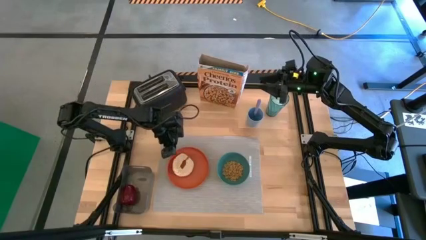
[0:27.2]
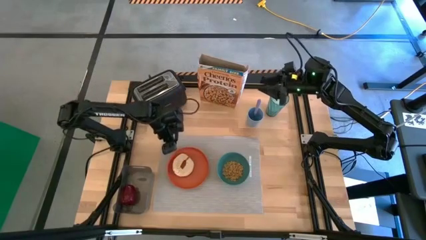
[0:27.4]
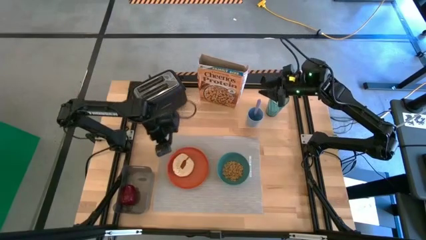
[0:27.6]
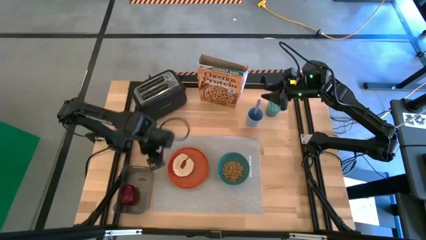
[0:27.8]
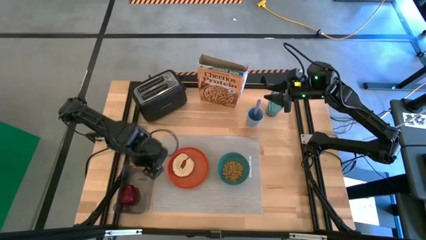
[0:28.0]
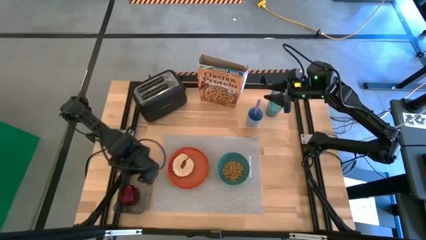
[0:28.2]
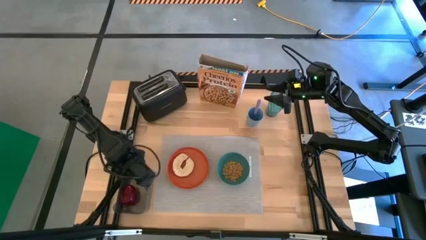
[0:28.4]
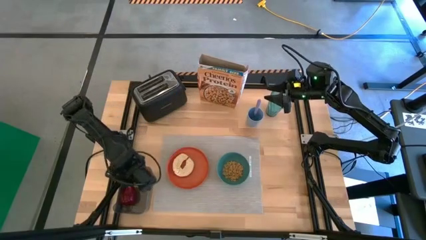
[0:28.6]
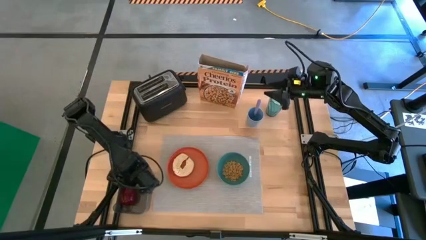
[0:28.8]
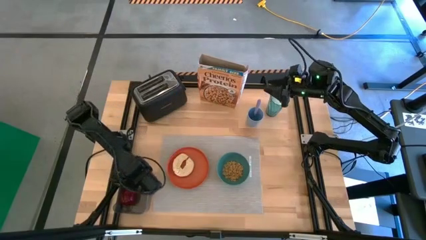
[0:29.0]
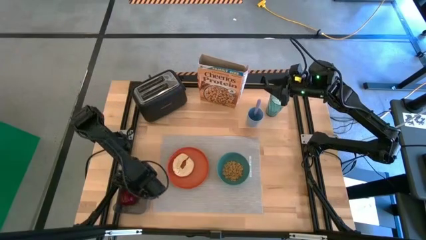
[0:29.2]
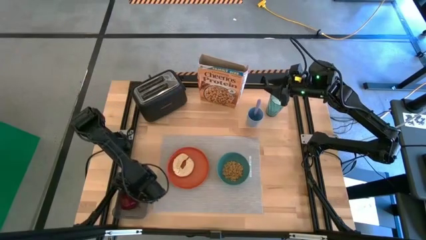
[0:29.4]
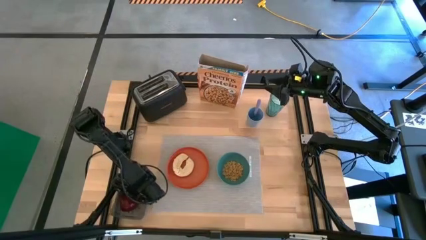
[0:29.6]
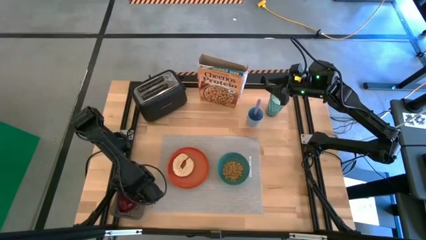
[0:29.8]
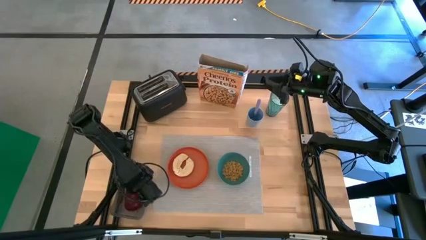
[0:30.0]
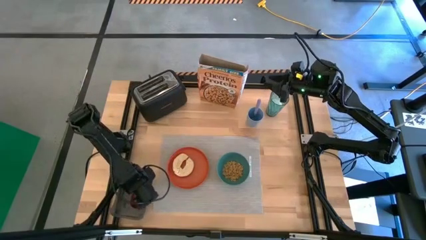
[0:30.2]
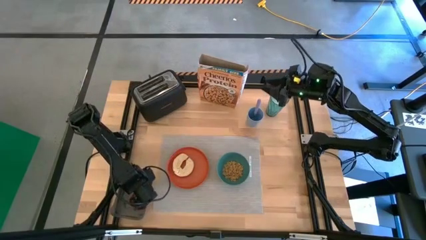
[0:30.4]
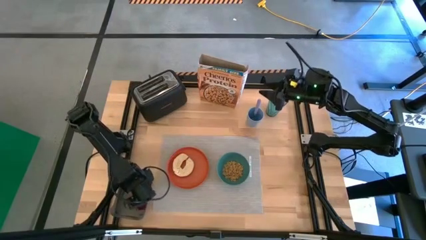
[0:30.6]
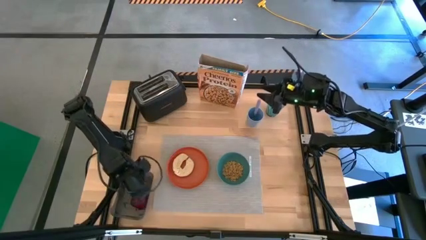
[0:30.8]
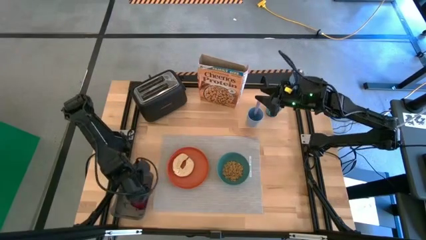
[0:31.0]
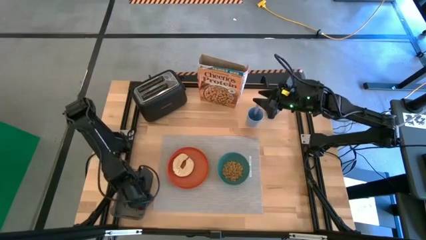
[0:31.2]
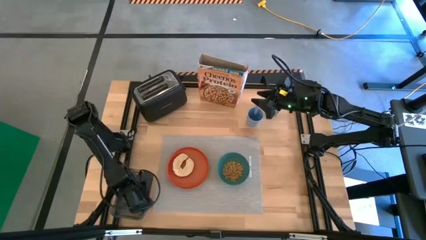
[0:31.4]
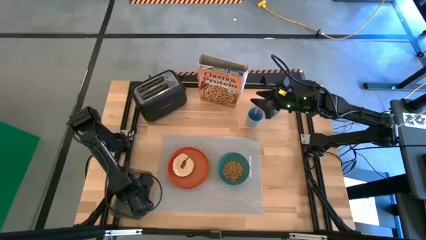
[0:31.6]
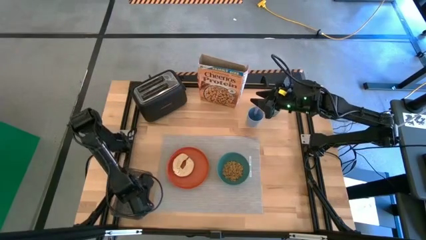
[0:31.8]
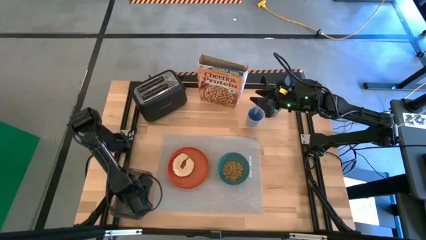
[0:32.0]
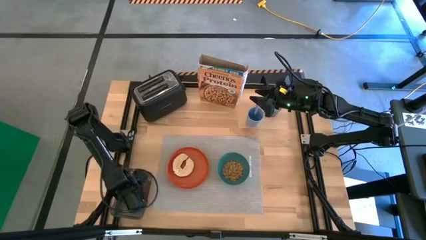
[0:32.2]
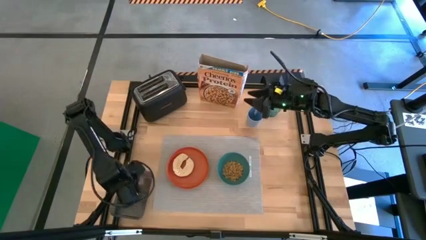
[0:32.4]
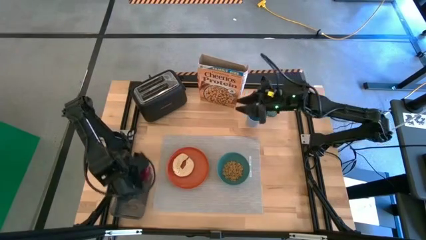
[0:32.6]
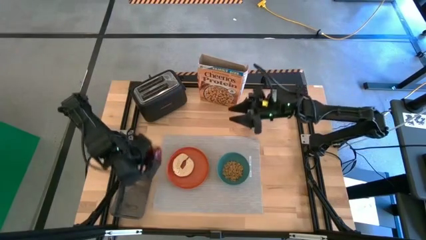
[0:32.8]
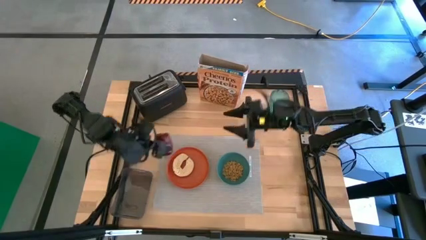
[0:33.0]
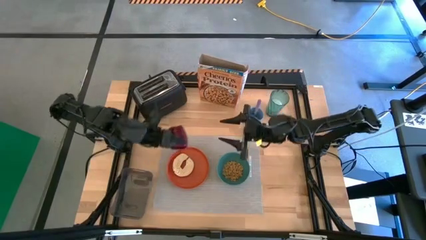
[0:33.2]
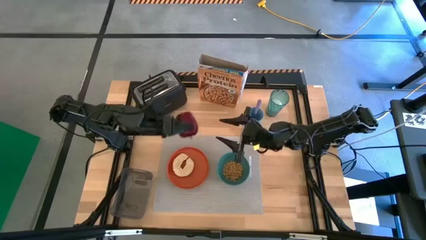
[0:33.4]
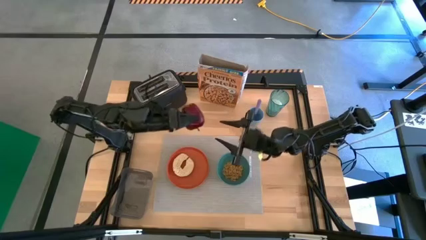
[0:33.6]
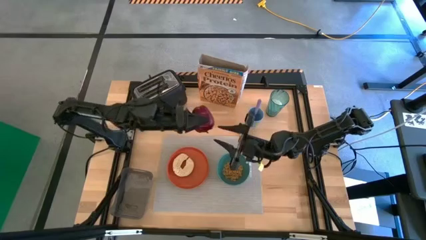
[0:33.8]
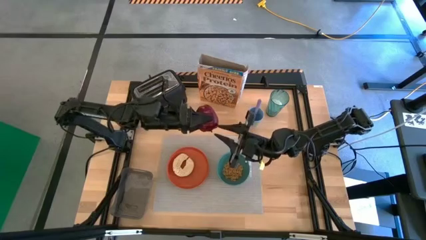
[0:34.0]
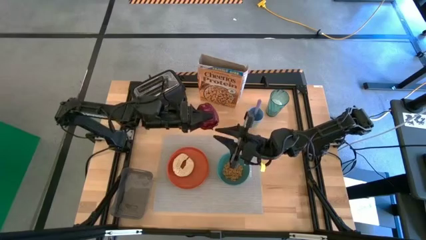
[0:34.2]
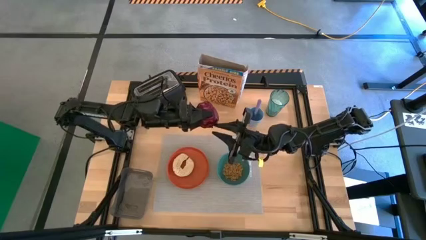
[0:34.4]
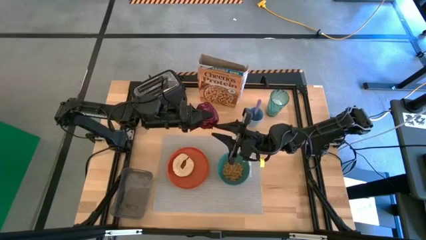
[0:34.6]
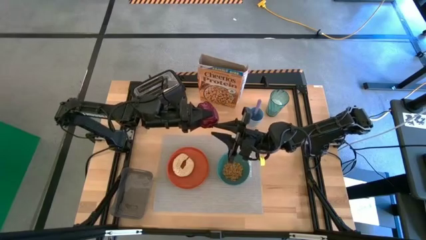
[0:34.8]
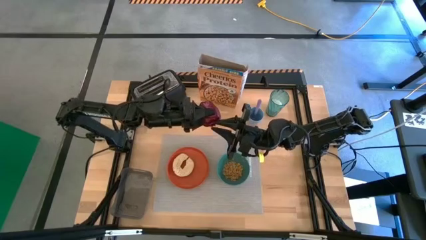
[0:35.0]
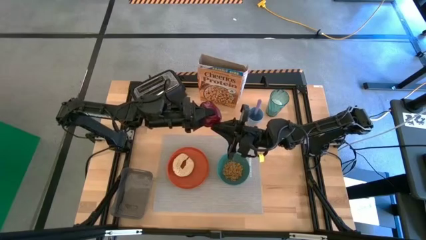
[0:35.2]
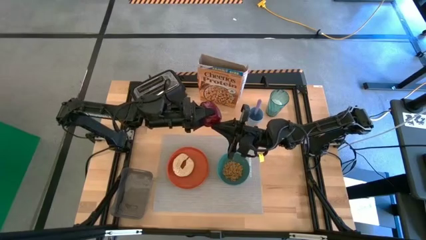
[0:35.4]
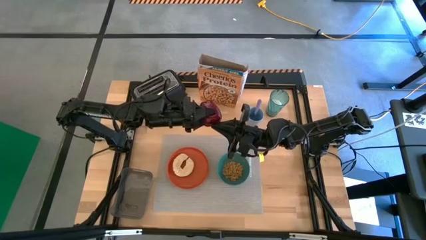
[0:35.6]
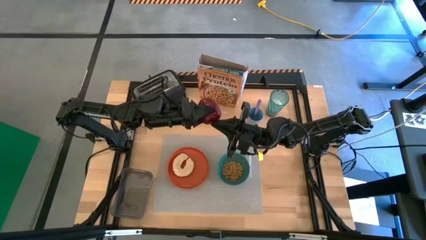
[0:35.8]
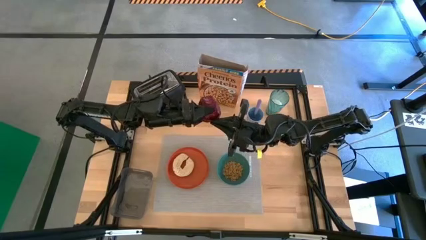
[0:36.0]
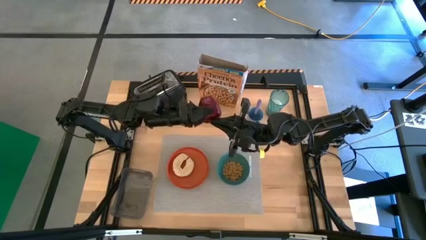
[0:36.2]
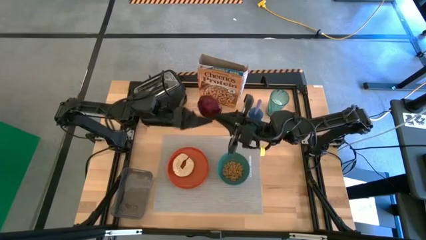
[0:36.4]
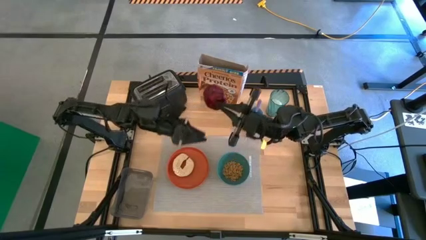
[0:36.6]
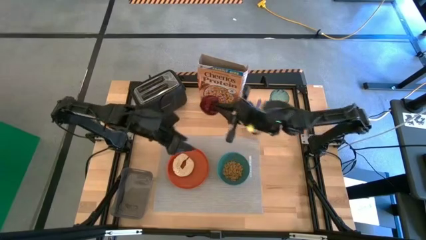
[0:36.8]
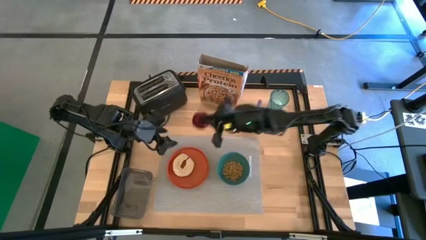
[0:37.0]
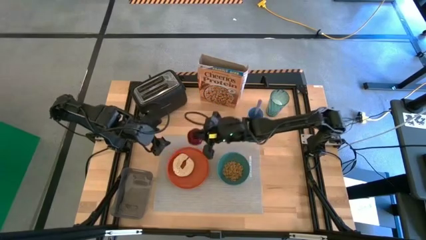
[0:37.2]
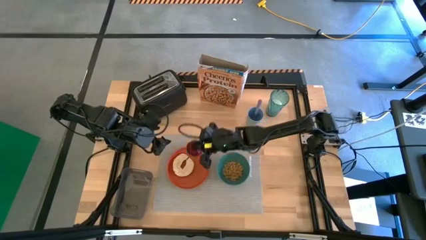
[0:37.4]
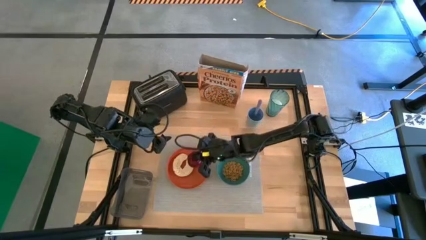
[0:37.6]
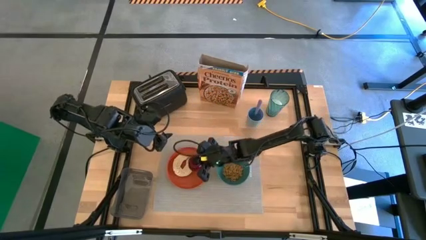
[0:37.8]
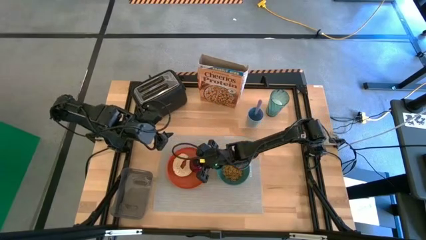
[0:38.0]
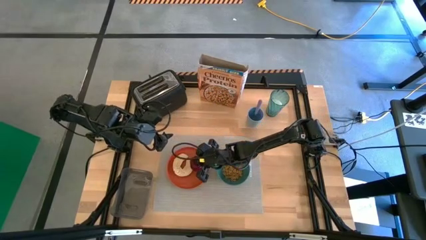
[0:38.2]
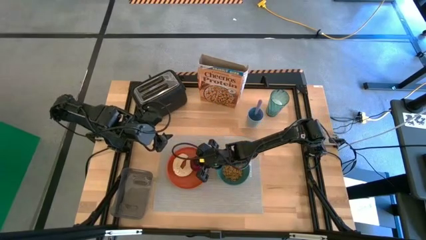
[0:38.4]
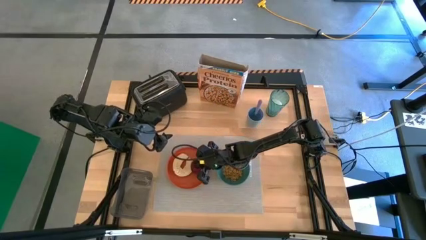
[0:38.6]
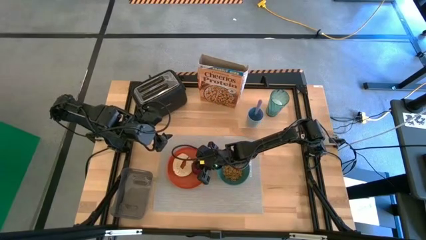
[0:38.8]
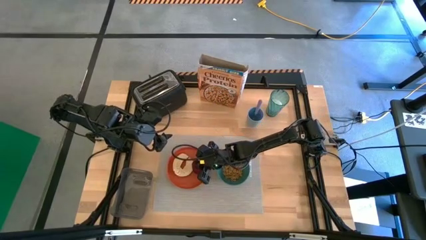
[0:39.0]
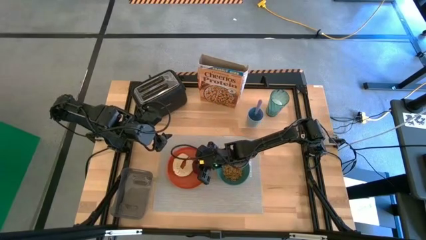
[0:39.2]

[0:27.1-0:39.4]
Task: Arrange a breakfast setting
Put the apple on the orange plate
